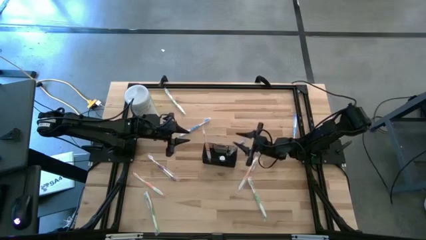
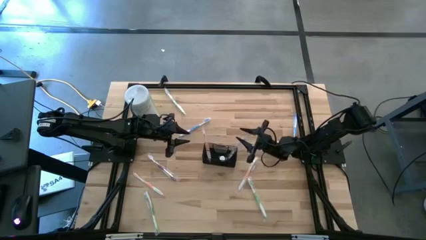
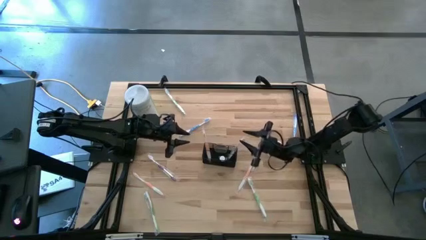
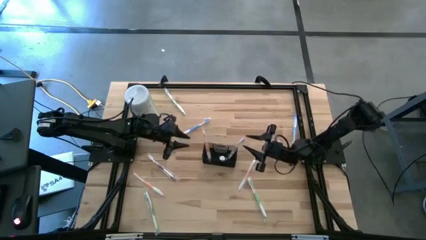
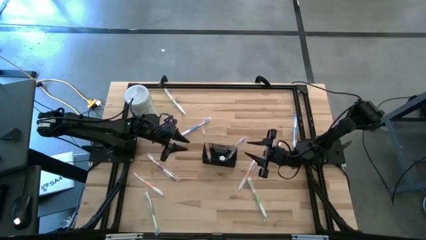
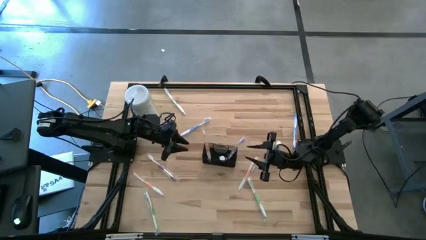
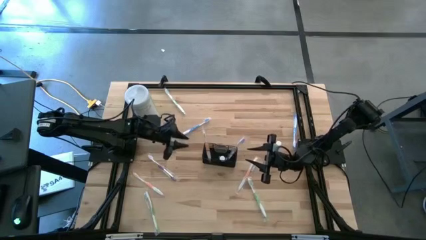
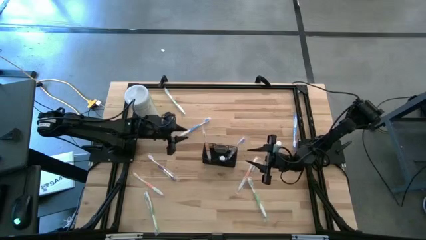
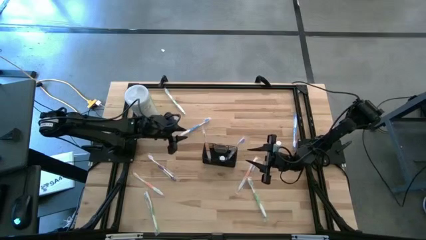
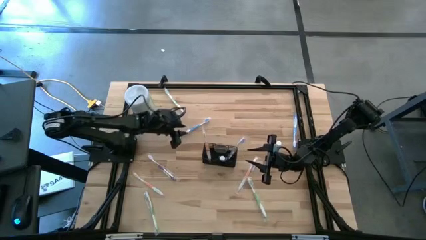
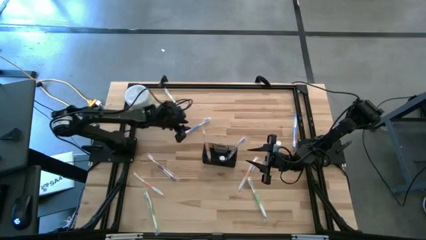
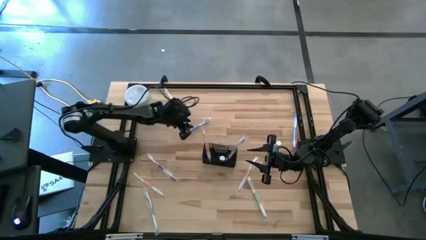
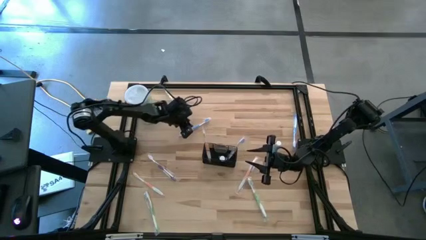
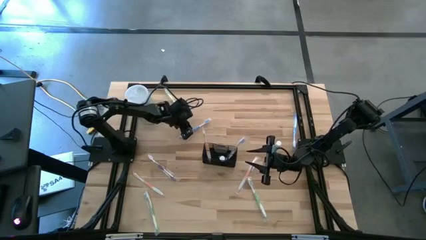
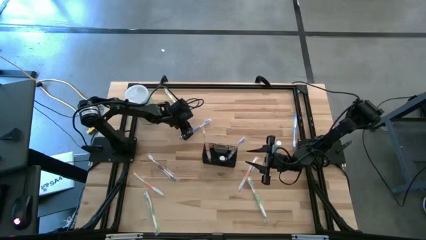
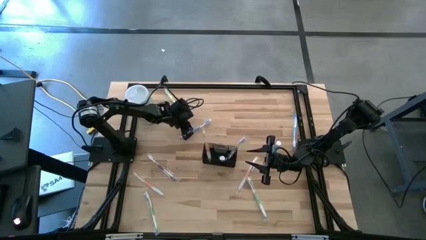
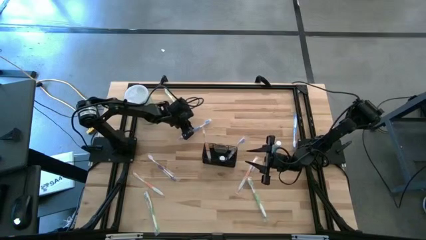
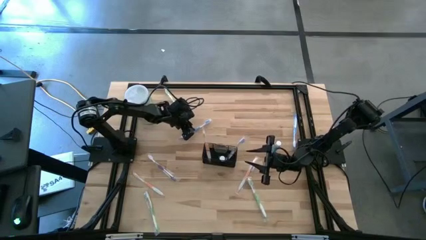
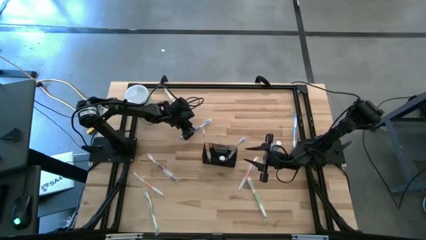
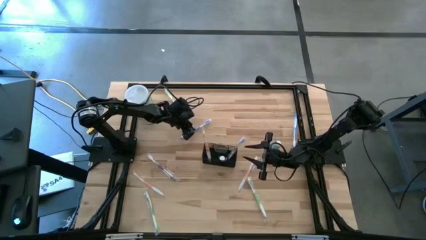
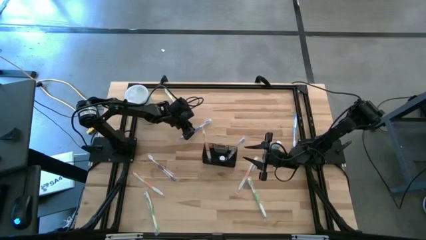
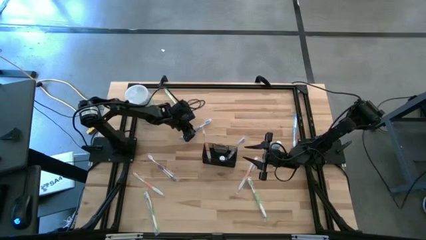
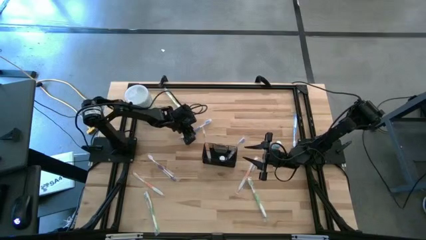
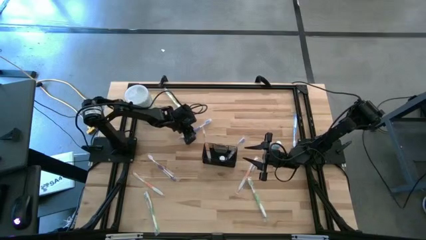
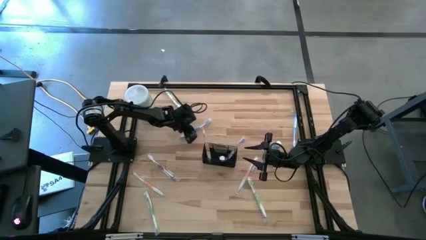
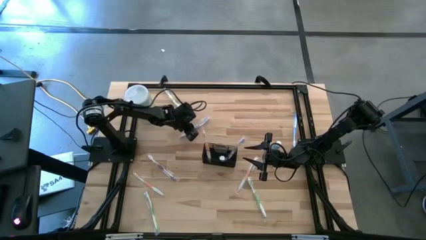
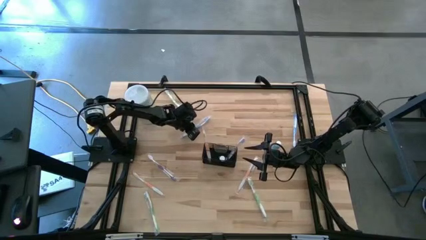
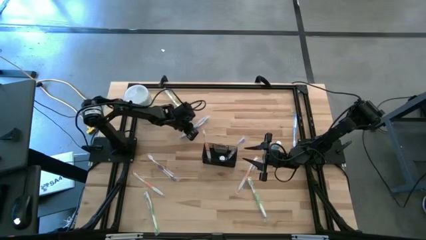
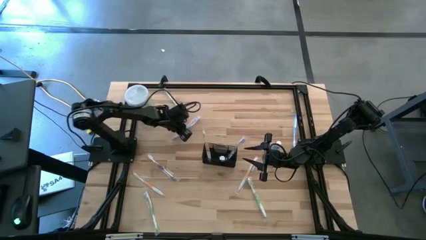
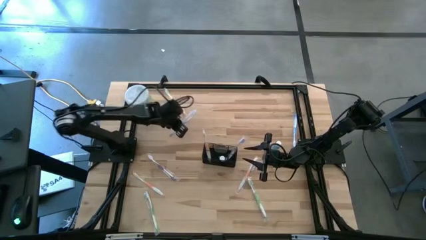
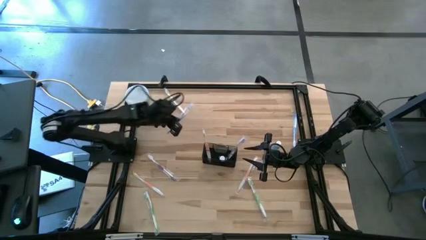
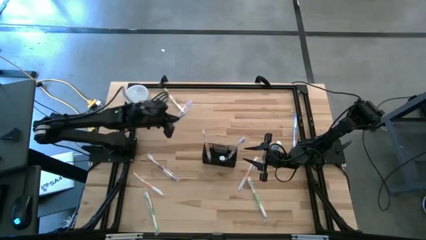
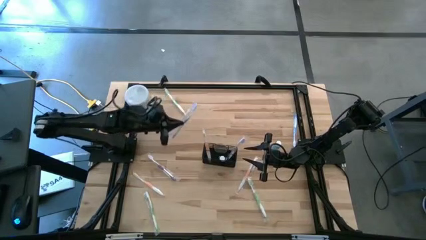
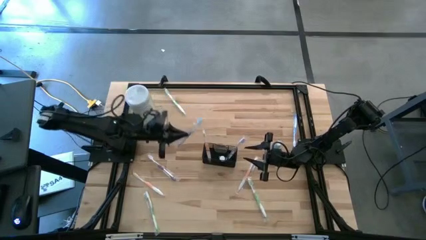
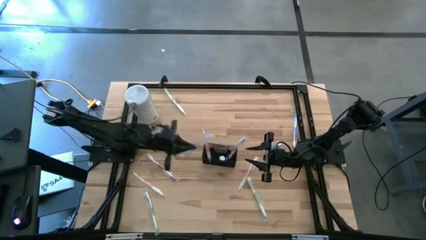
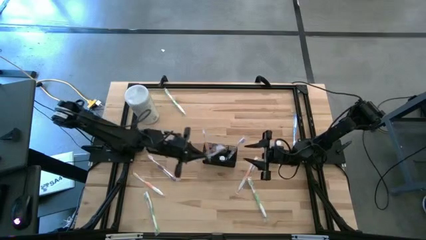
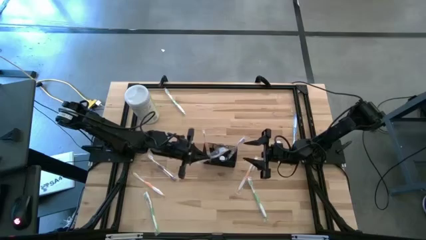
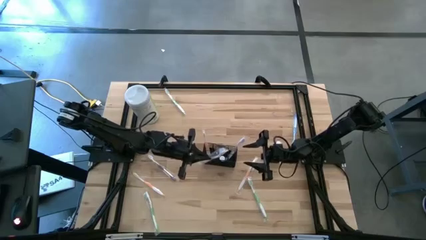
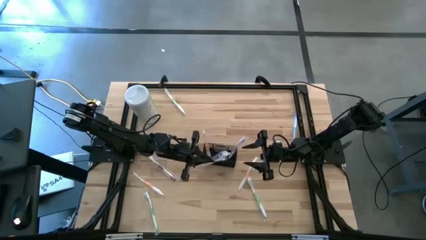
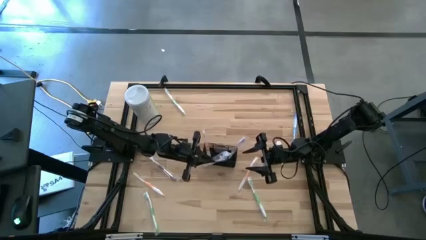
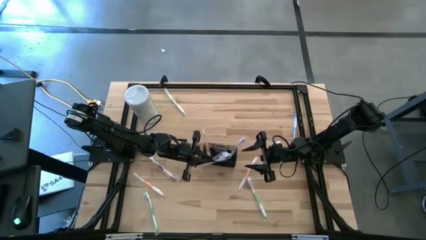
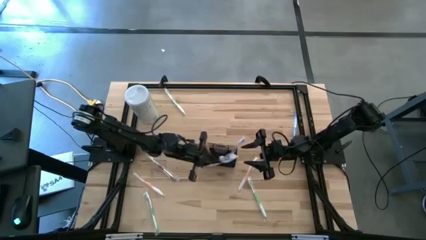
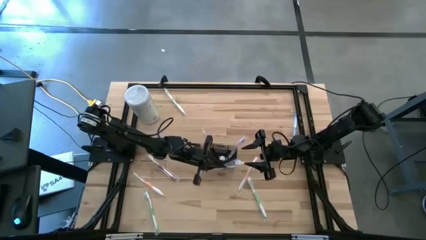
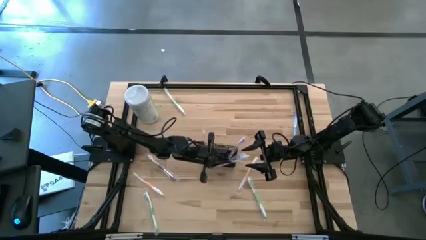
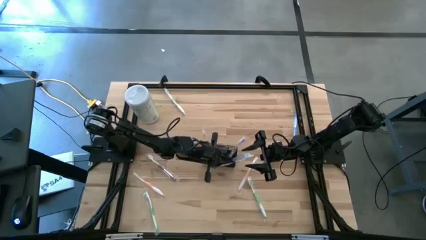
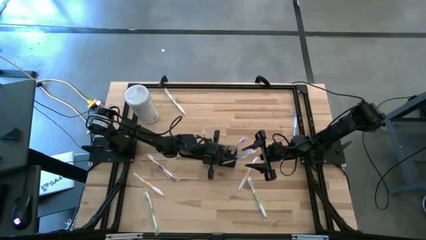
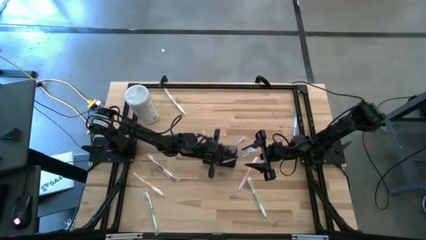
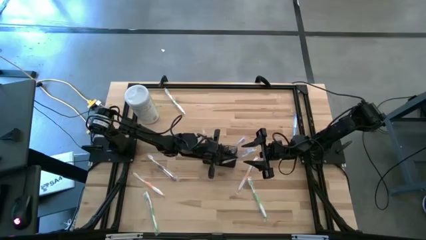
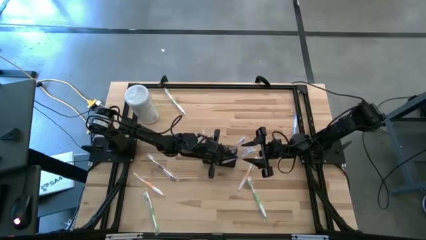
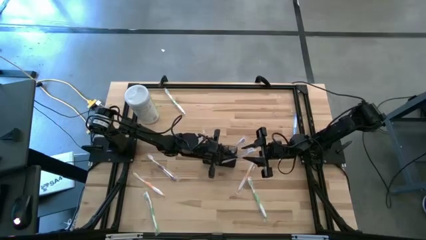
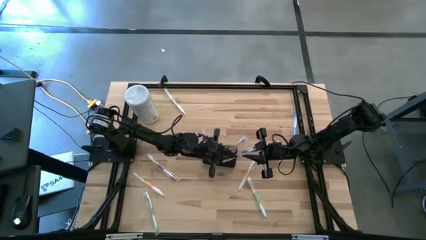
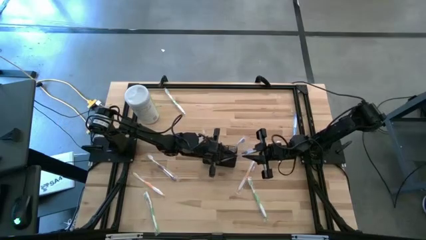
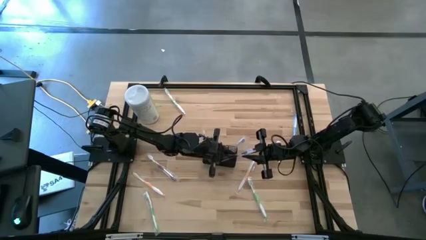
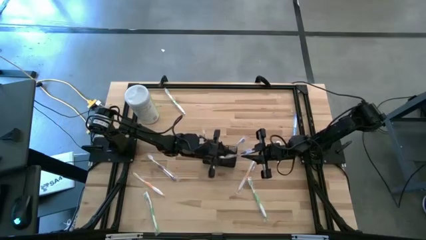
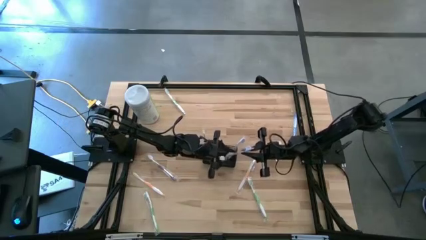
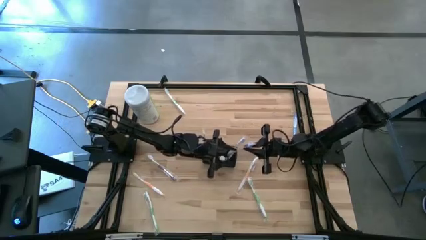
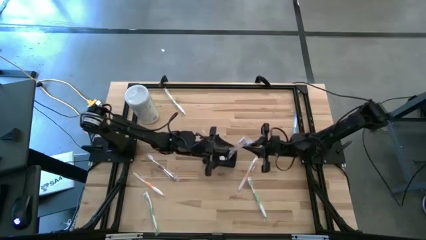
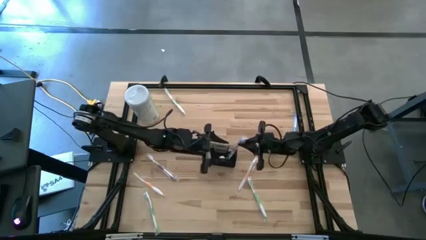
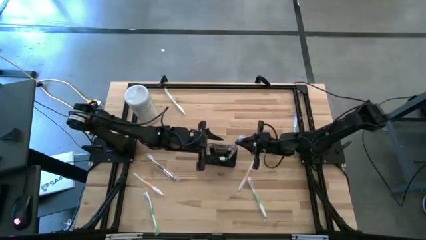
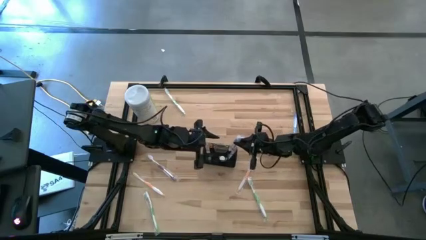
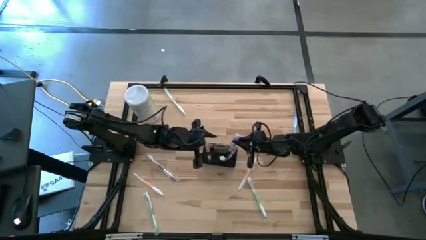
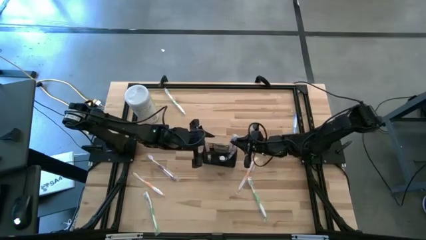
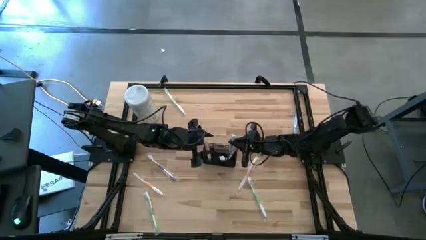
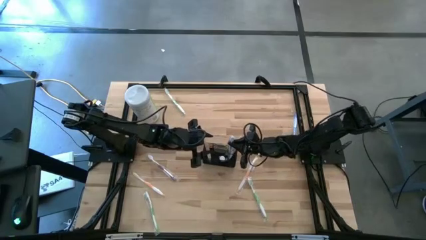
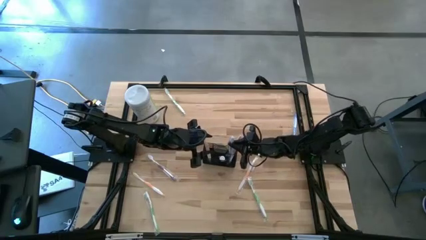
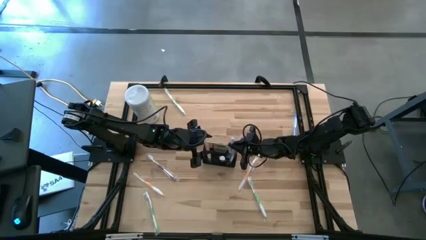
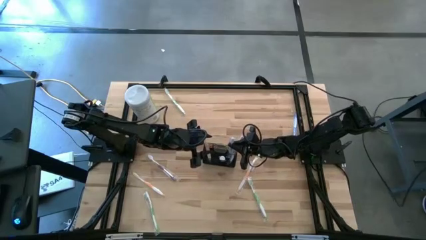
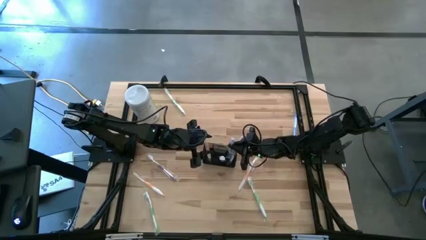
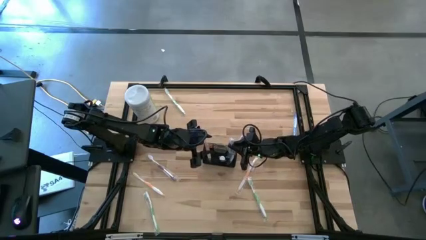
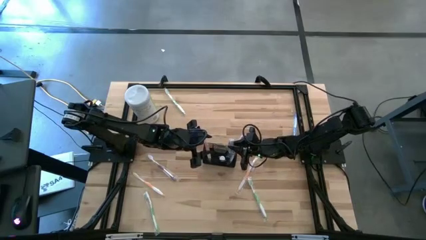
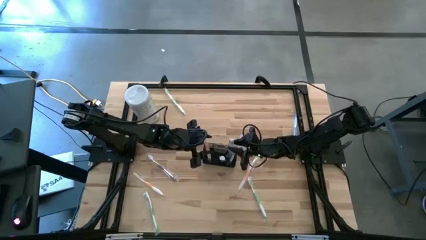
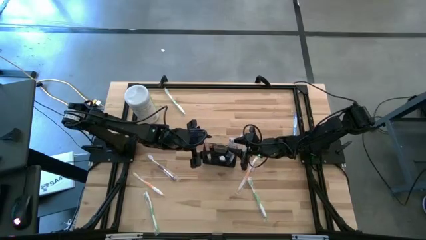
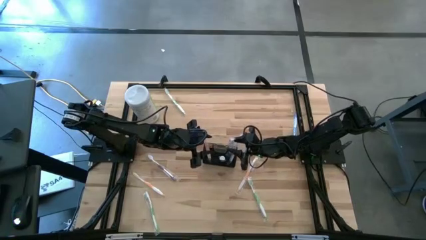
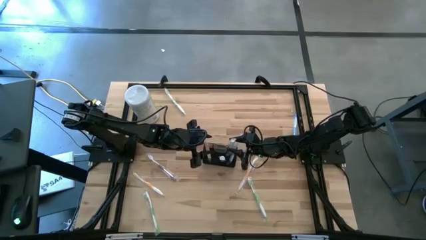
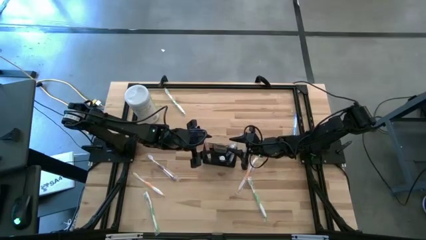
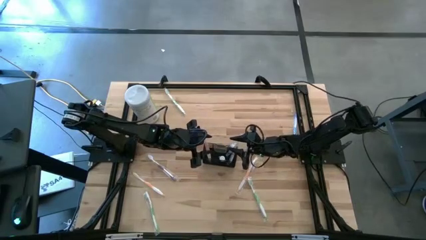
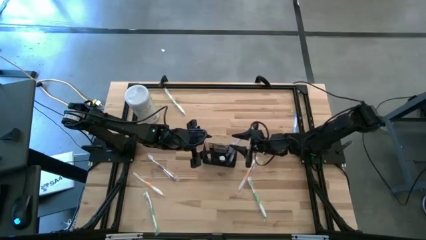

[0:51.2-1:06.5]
Task: Pick & Place toothbrushing station
Put the left blue toothbrush into the wire organizer
